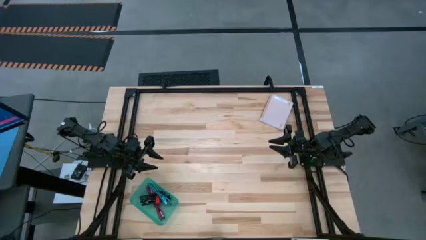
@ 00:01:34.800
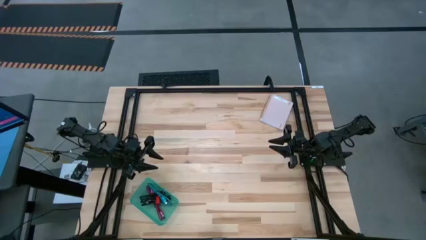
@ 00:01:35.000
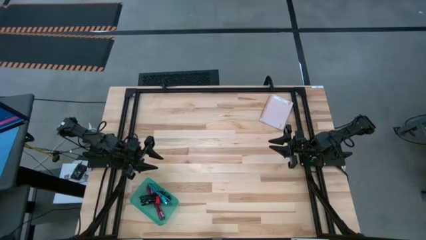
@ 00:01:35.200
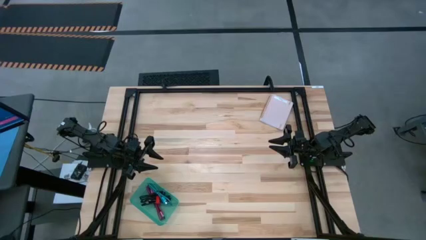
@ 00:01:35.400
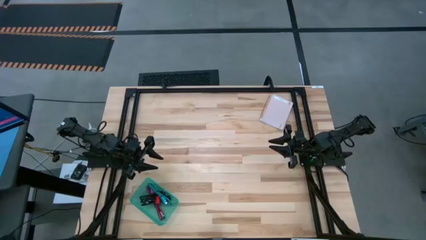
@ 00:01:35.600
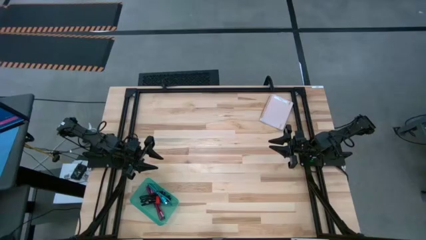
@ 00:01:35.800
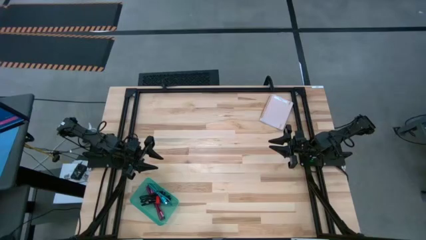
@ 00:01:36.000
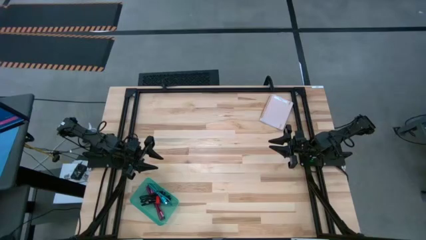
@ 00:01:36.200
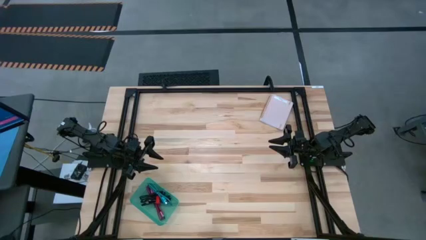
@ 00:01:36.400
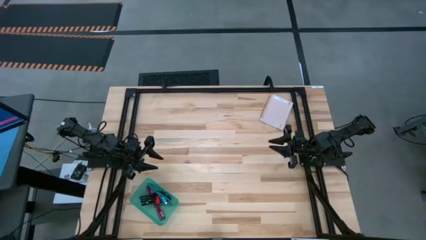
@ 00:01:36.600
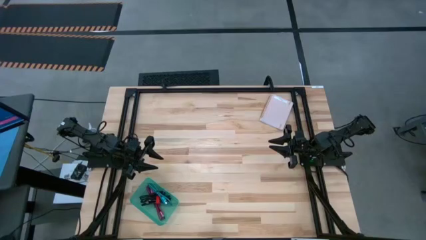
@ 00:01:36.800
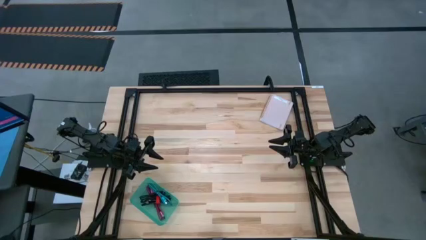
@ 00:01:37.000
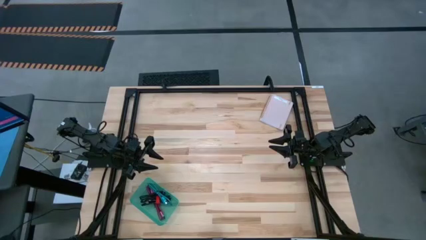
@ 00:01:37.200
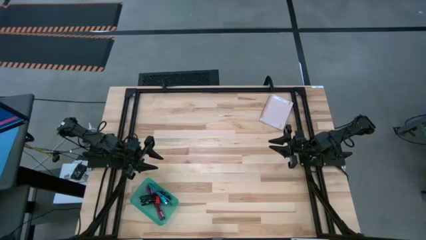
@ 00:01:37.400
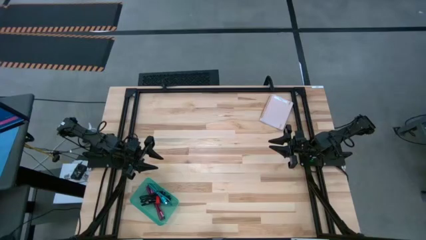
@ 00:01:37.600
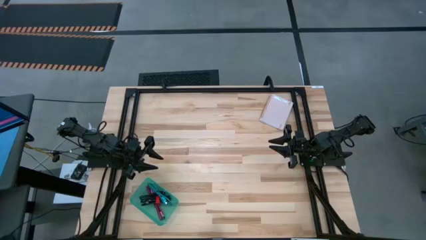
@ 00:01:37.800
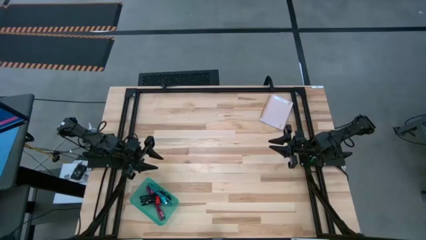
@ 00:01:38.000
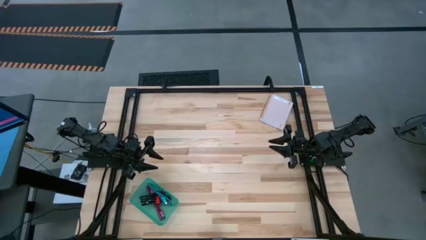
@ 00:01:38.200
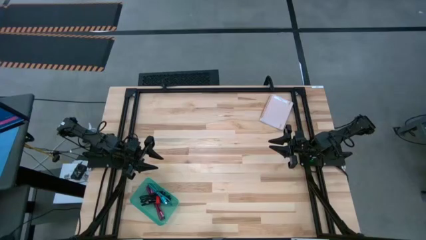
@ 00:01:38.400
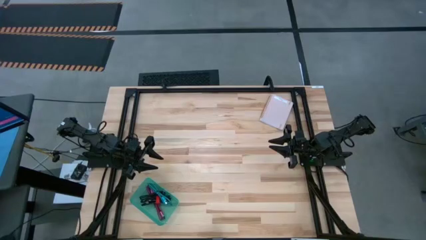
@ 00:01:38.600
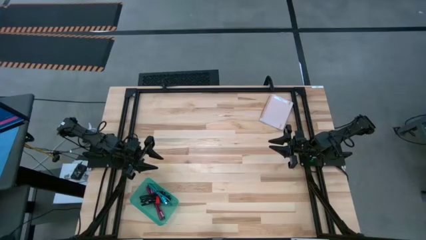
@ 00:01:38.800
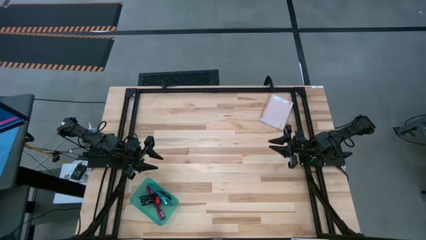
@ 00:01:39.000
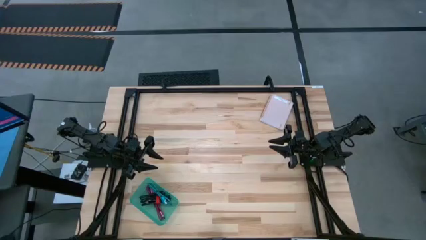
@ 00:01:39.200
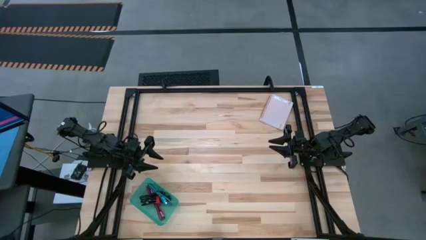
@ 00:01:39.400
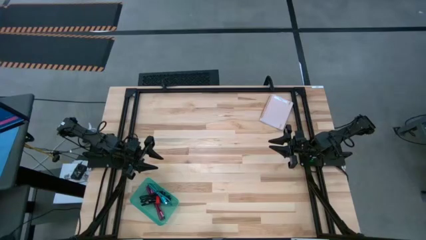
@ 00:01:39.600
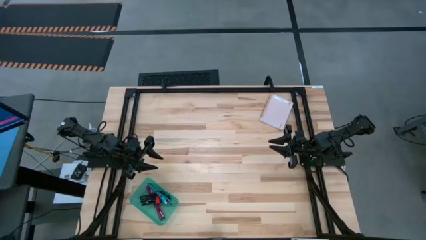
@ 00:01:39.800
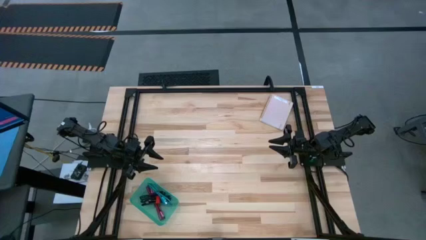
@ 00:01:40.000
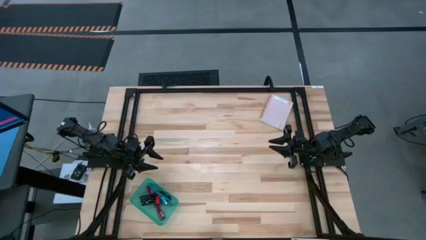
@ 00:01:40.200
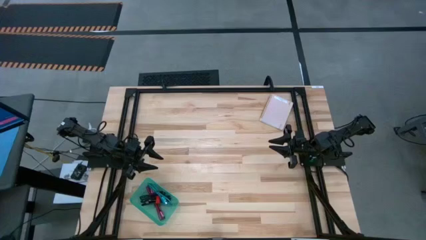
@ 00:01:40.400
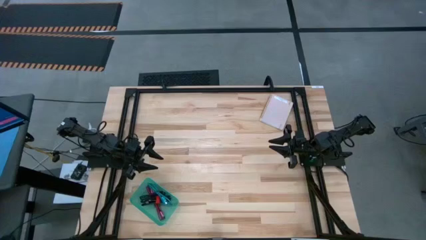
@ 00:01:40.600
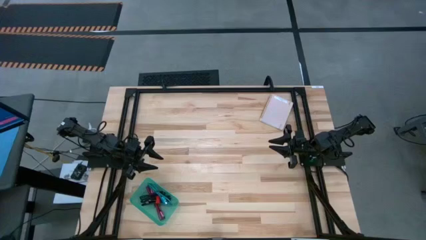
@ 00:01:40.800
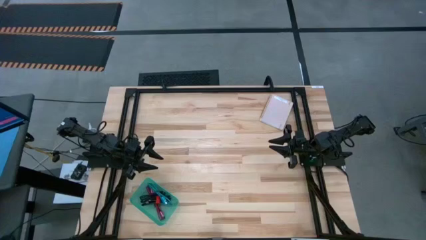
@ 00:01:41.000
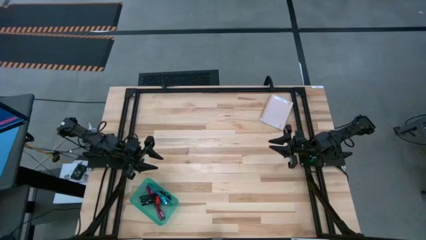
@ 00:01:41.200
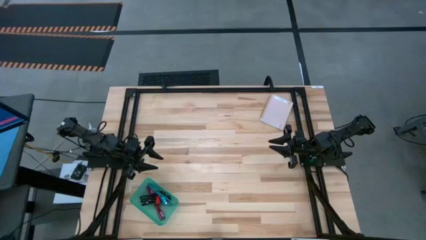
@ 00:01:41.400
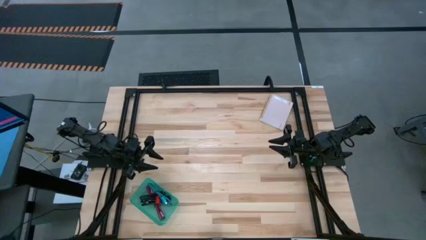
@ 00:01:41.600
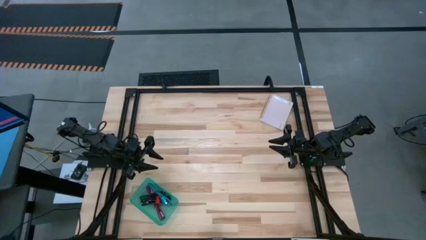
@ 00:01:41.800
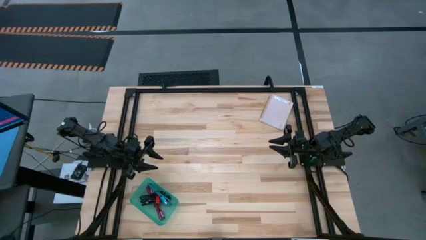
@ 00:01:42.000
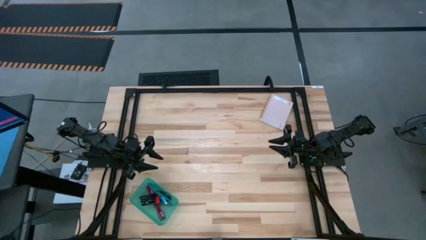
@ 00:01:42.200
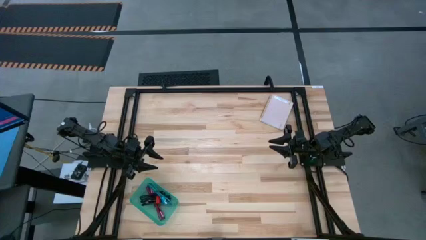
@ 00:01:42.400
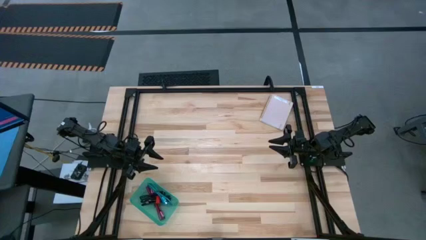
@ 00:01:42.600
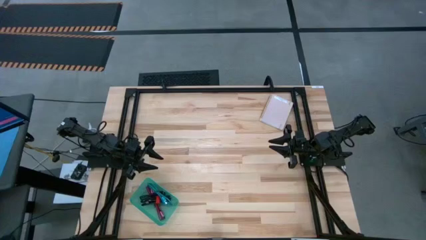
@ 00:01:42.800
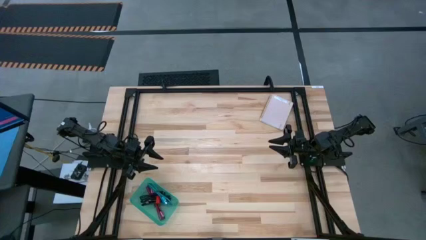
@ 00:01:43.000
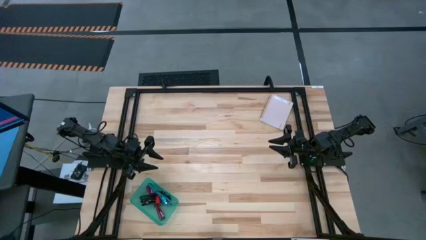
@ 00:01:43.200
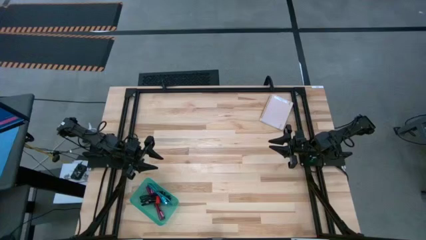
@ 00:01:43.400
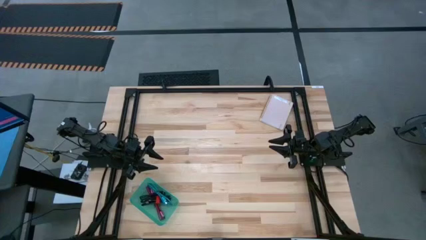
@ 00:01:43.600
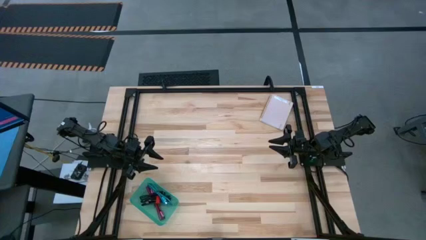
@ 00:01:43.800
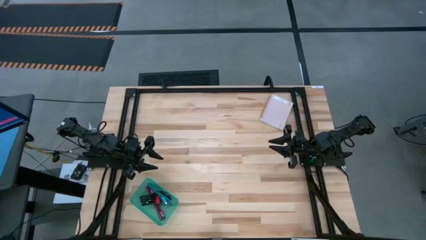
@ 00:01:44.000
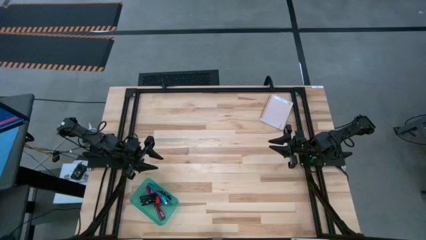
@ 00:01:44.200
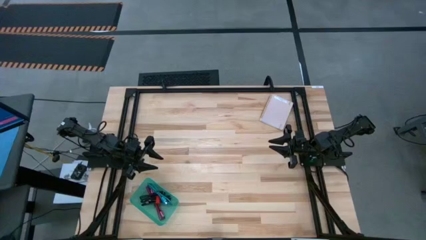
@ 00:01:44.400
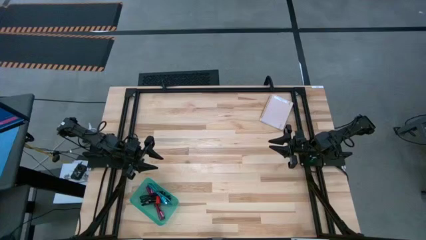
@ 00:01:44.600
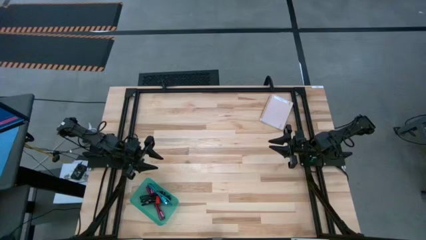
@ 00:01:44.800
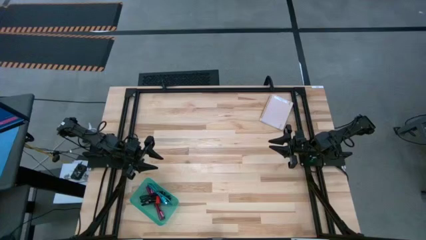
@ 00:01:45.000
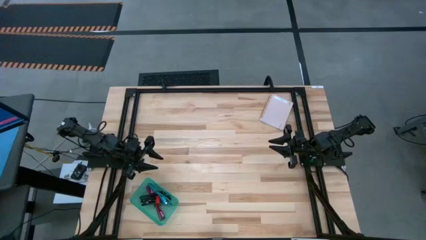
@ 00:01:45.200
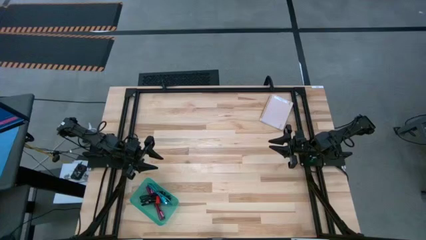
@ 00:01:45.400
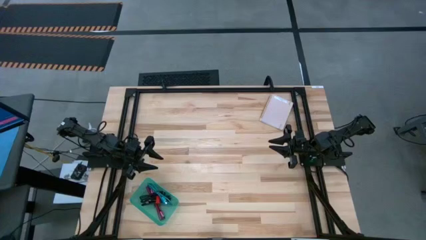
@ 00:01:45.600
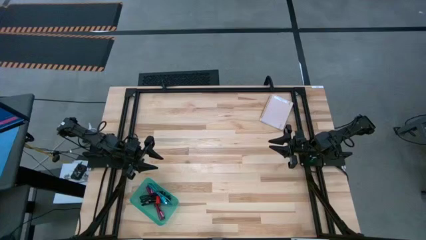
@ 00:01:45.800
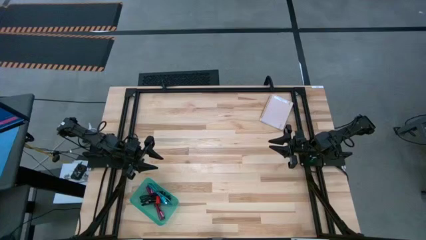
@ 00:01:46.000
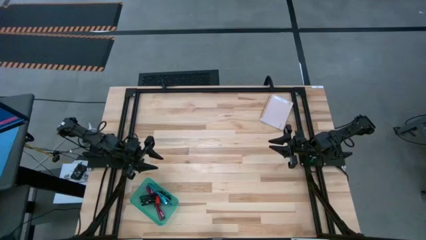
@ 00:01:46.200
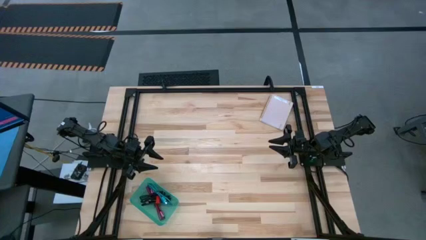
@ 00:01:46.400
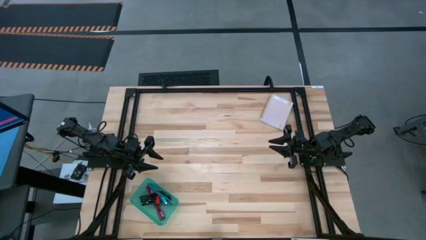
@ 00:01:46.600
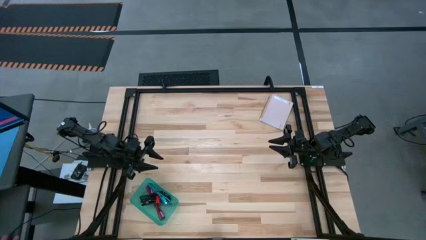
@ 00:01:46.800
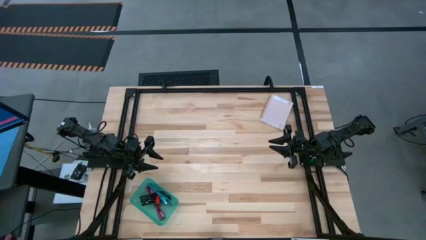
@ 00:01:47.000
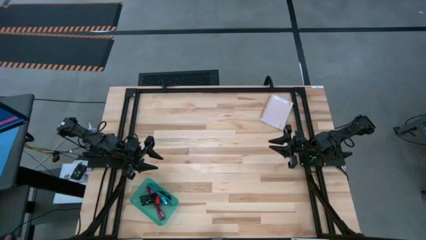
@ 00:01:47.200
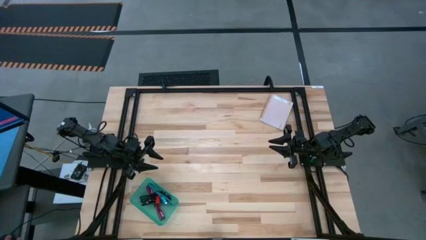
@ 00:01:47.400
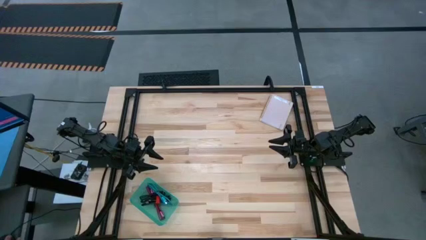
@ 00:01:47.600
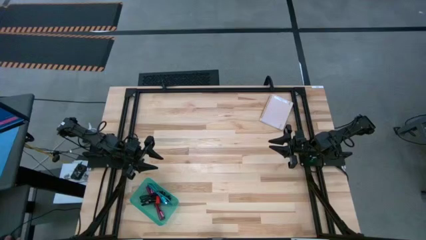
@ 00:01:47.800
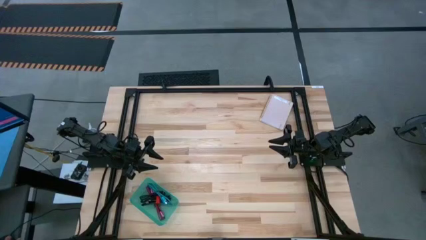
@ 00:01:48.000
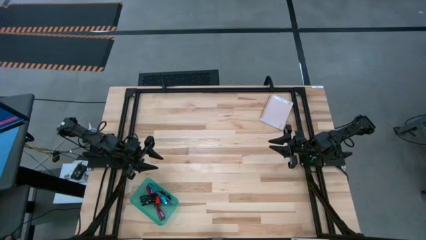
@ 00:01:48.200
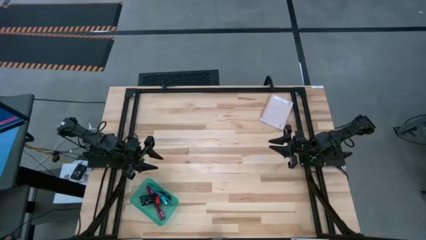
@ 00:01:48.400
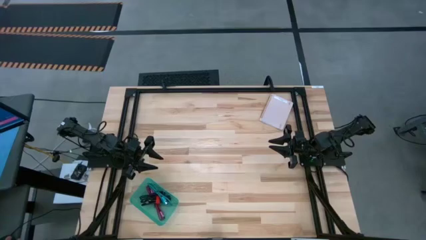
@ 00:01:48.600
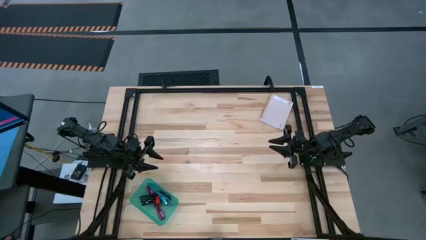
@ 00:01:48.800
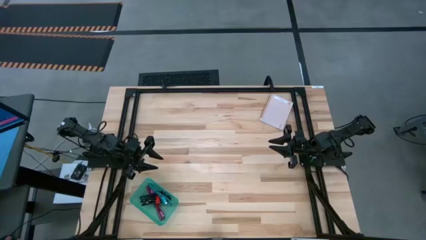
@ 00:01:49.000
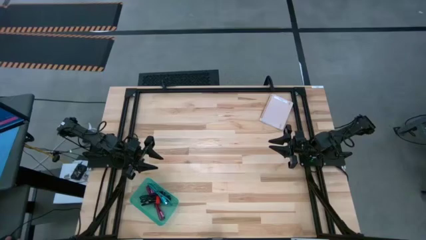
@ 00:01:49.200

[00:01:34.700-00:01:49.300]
Task: Pick and place USB-C Cables
Return to Home Position
